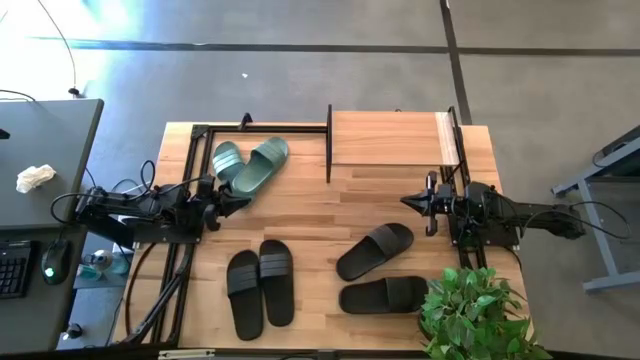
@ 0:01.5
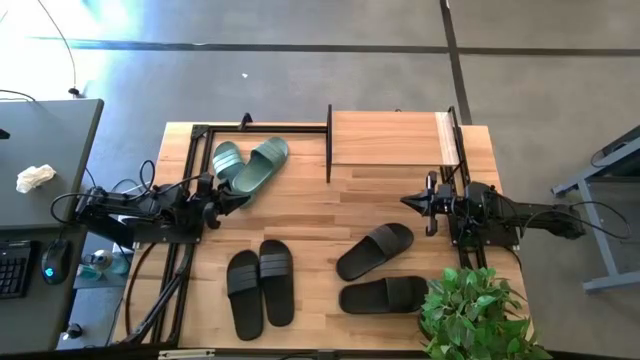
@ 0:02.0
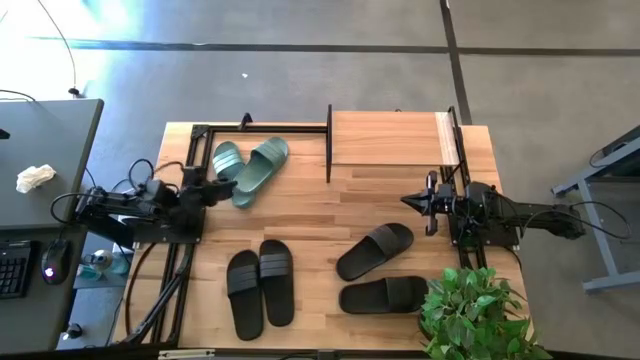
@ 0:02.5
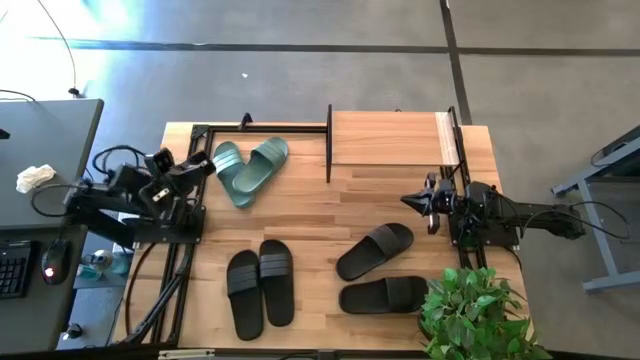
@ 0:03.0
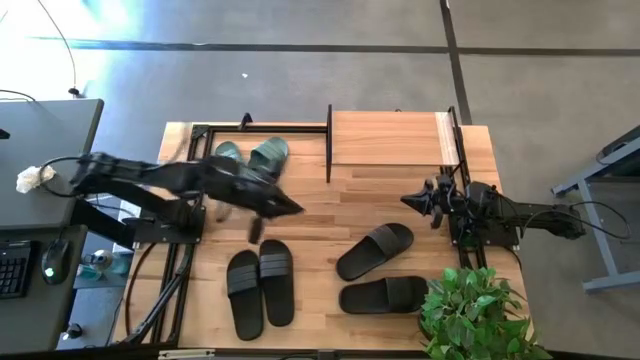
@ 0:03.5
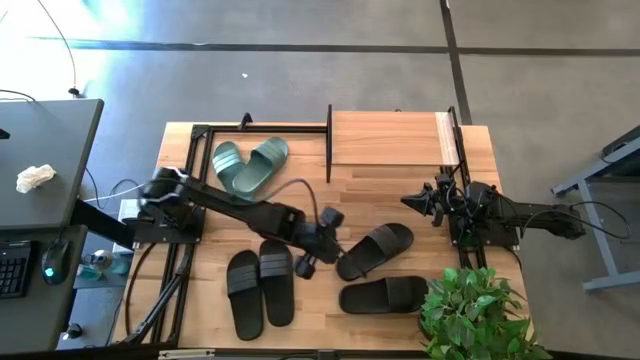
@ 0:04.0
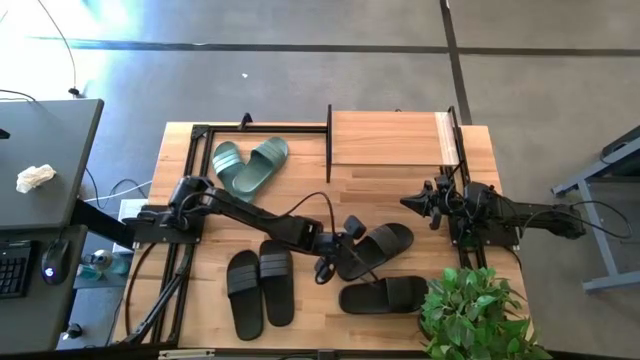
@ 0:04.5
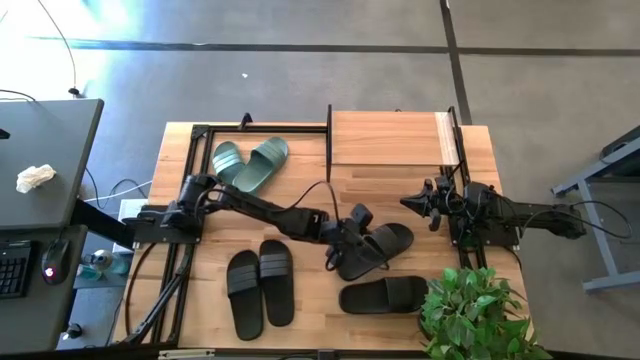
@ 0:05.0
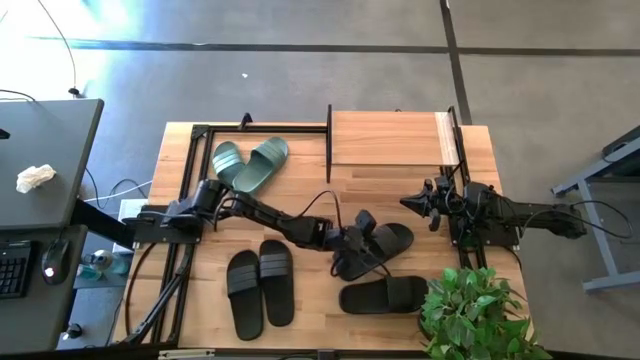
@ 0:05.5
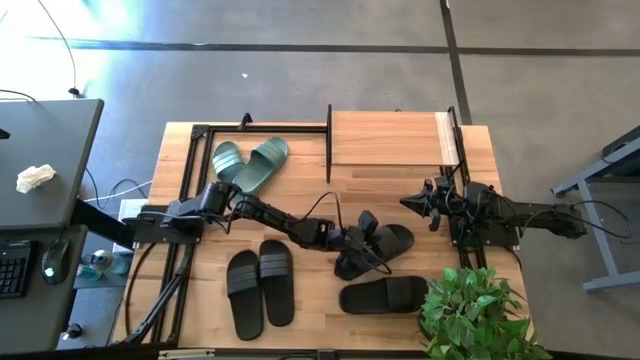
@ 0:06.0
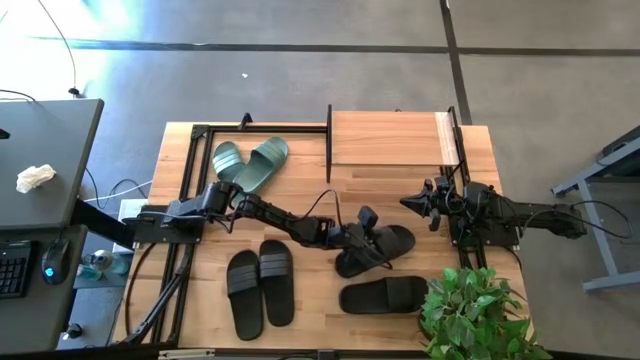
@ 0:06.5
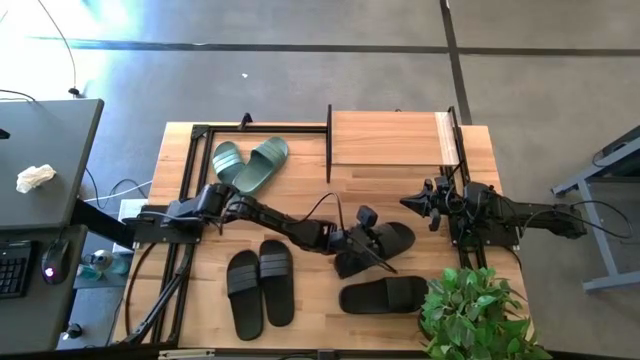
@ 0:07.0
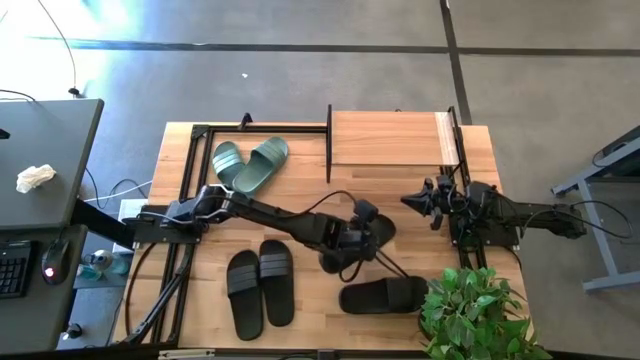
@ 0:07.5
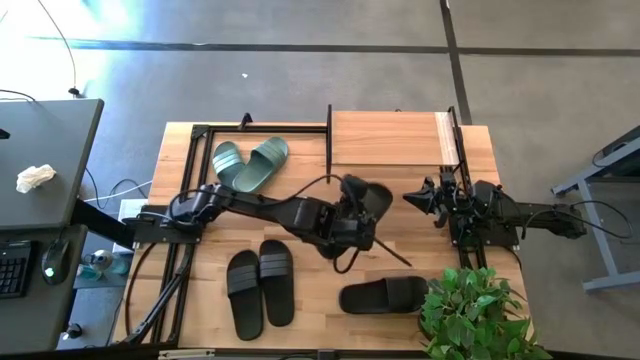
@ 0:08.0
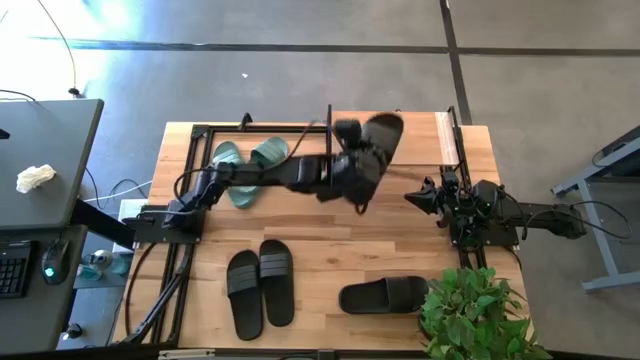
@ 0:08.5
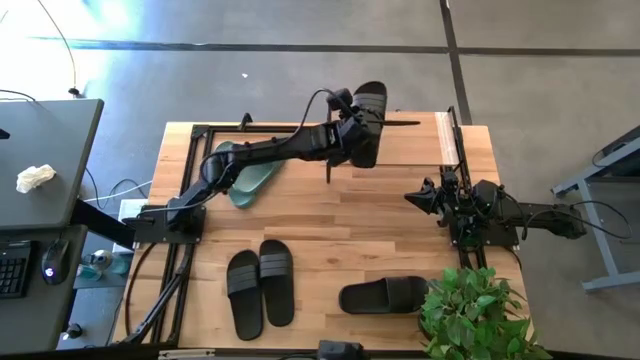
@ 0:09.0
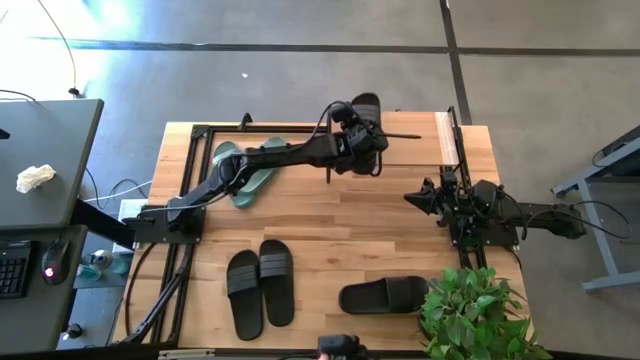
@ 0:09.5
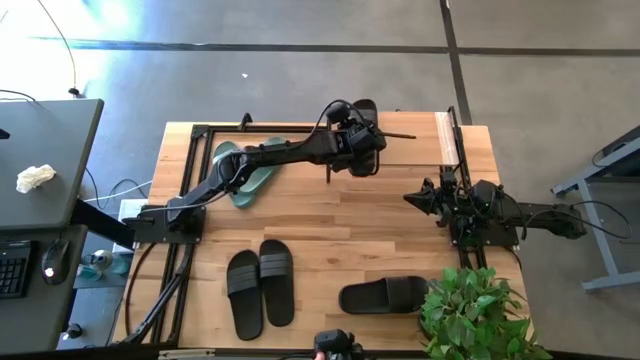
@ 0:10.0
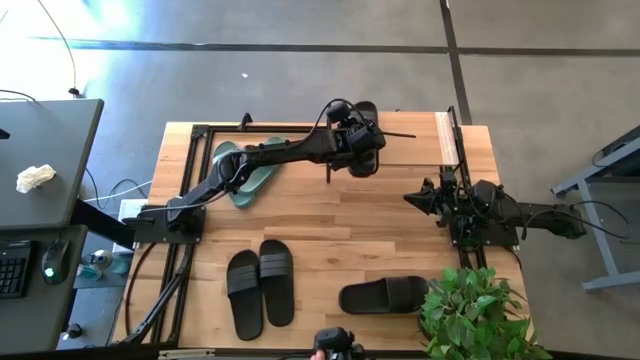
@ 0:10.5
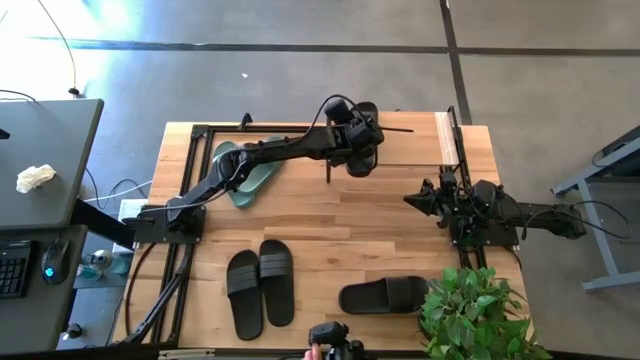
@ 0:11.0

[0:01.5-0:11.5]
Task: Pick and place slides into the shelf
Put the black slipper on the shelf

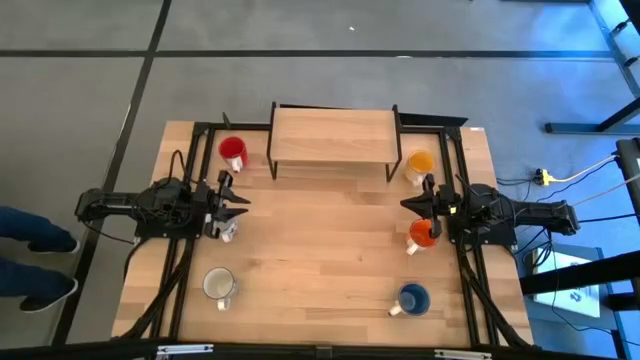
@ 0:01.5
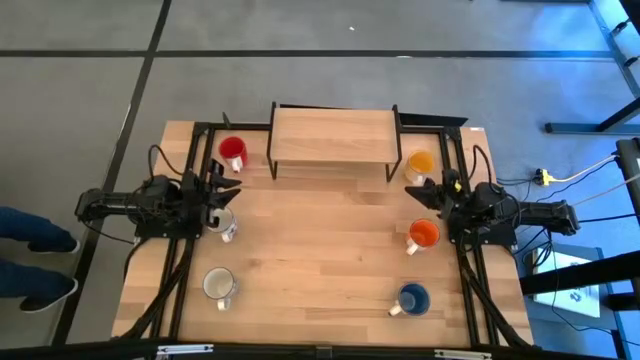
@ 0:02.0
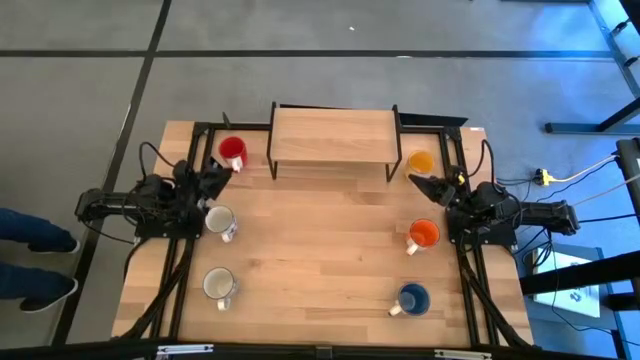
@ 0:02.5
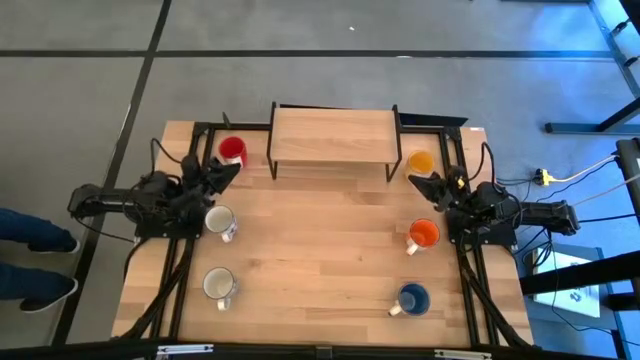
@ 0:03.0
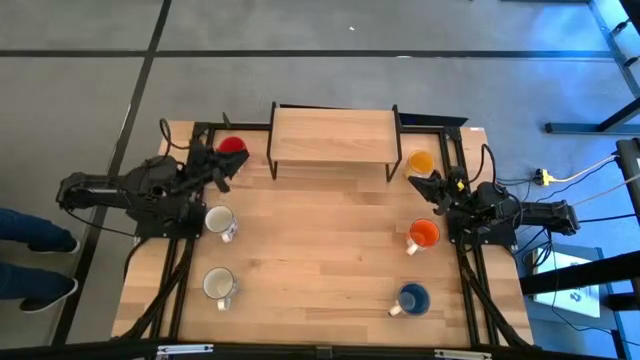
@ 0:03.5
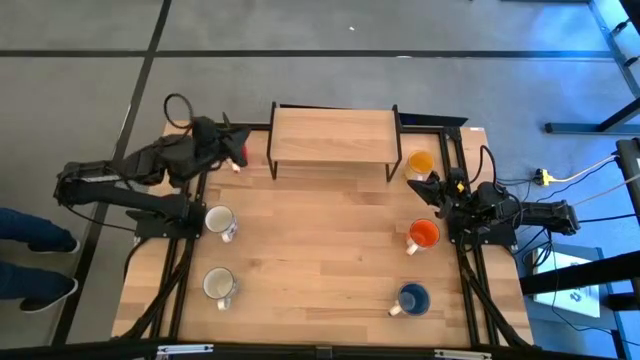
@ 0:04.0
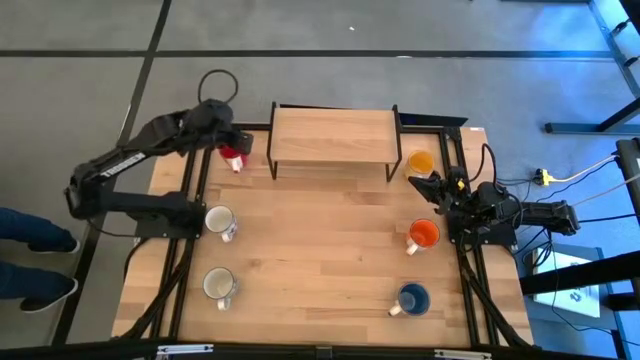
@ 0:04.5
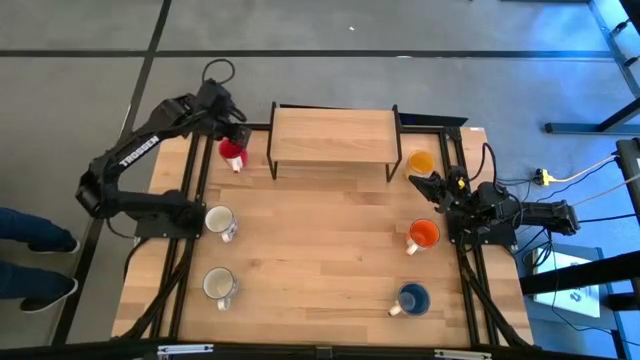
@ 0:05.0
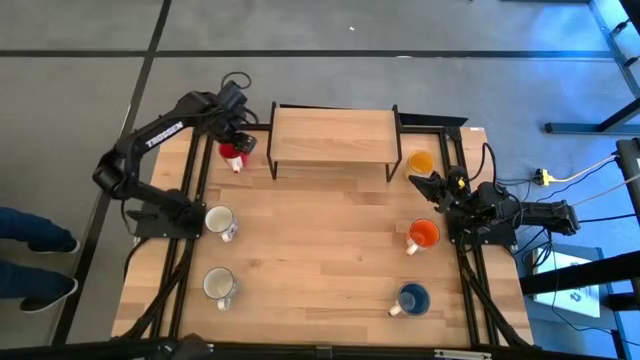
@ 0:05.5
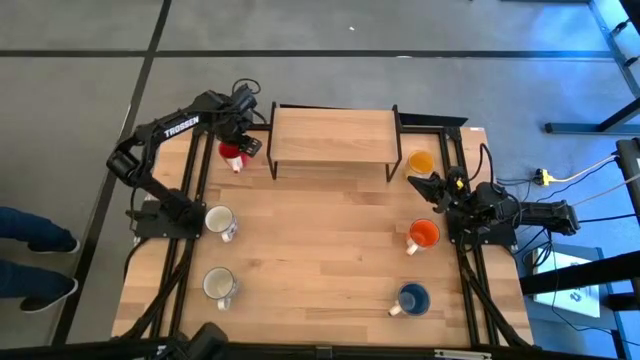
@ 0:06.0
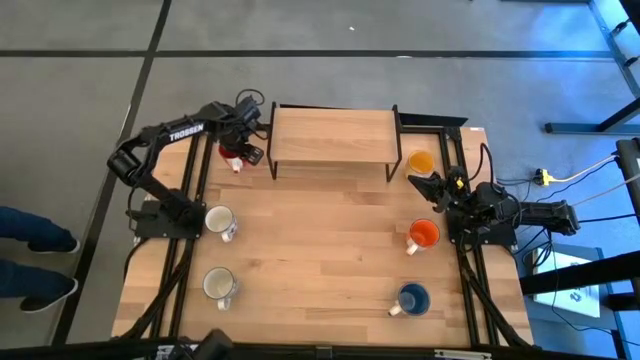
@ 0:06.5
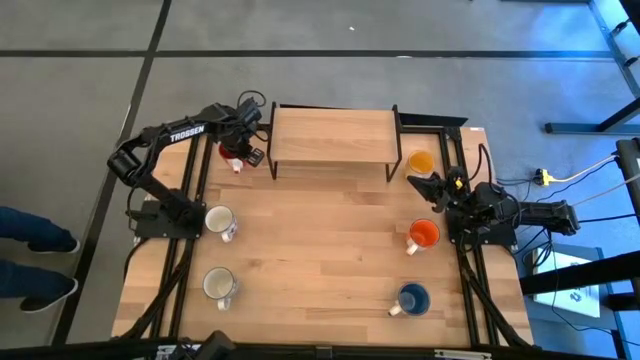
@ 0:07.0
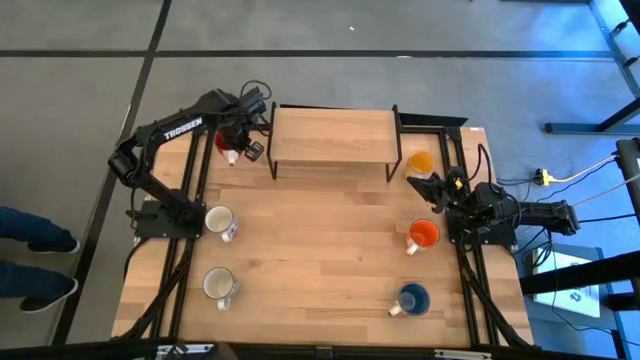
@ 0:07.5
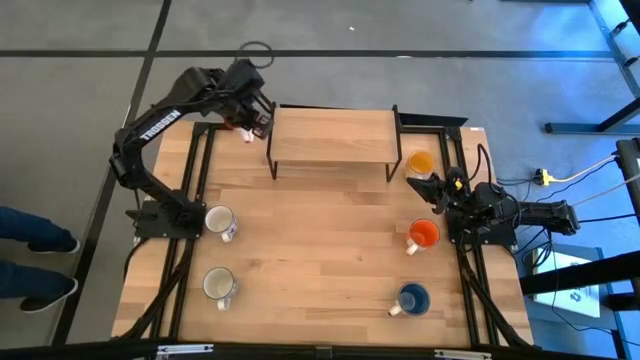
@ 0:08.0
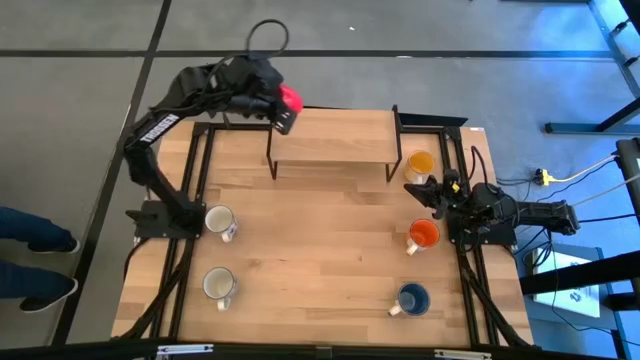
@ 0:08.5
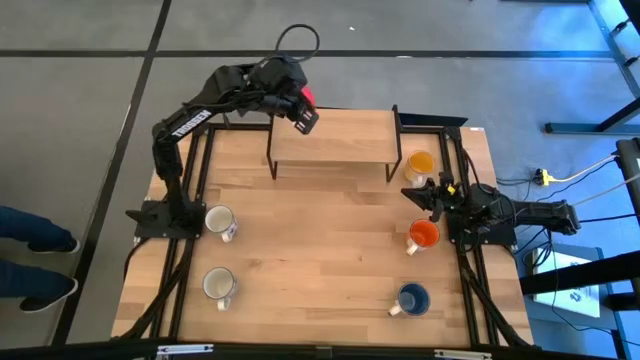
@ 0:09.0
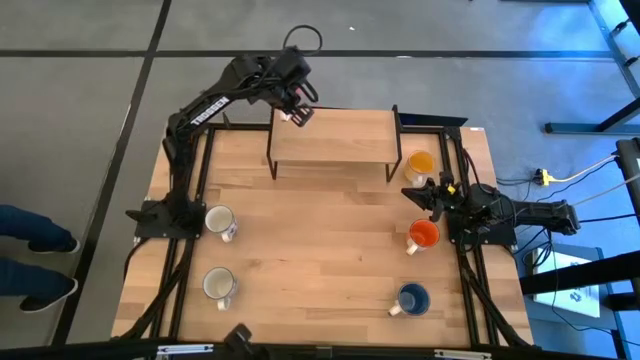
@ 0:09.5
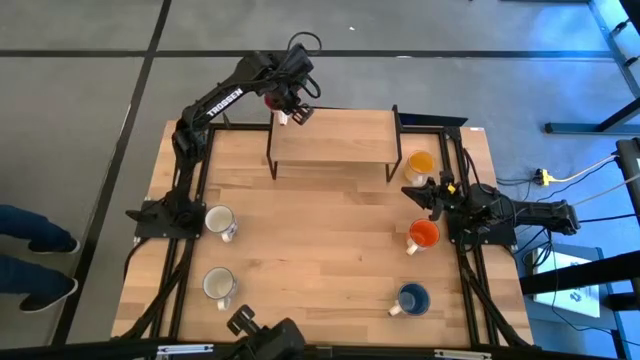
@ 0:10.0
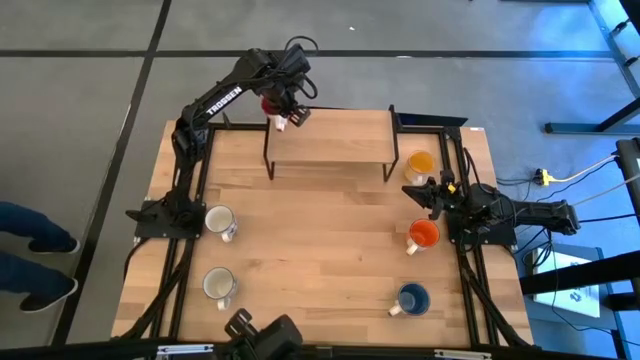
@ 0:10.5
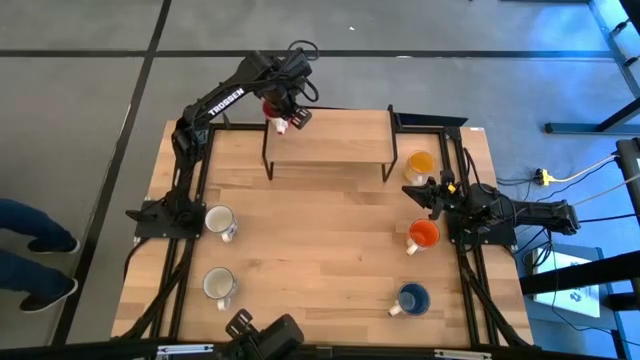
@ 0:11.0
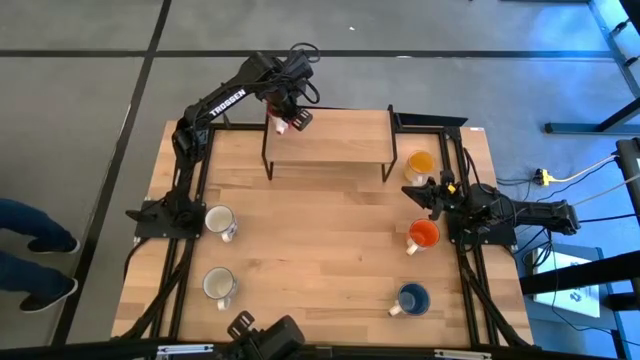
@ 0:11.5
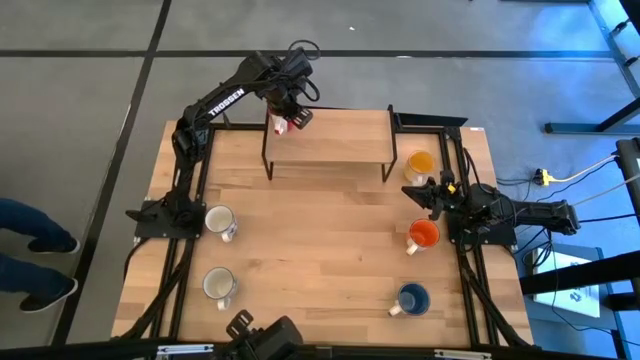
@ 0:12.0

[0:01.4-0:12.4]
Task: Place coffee mugs
Put the red cup on the shelf
